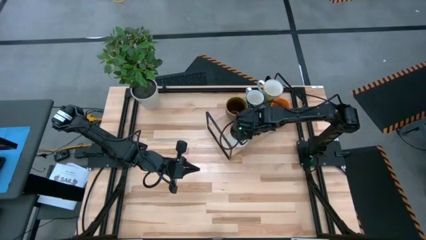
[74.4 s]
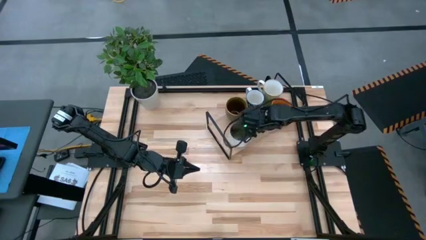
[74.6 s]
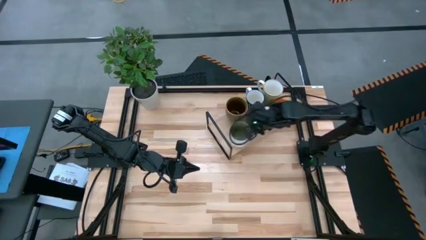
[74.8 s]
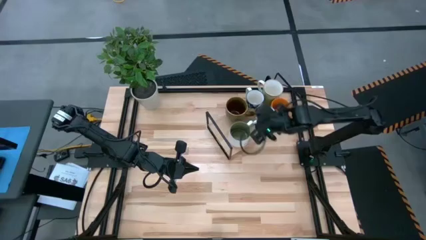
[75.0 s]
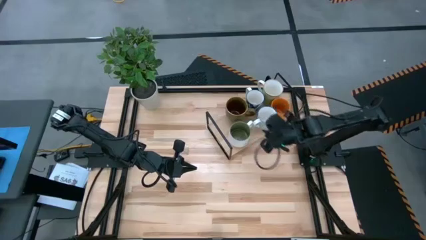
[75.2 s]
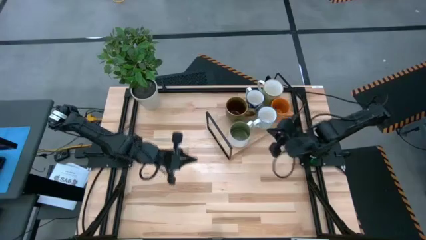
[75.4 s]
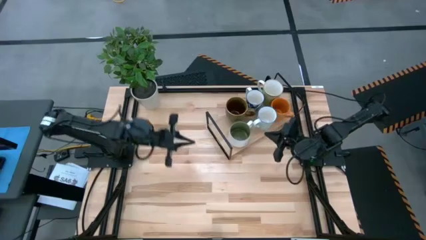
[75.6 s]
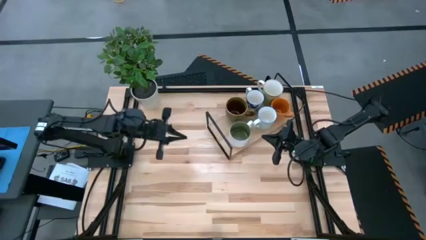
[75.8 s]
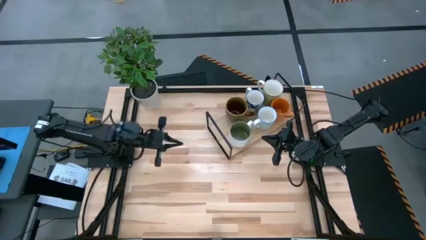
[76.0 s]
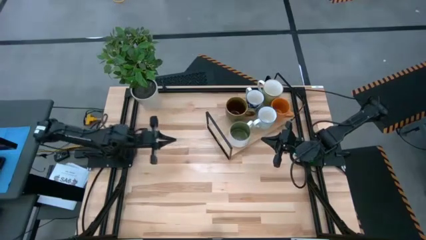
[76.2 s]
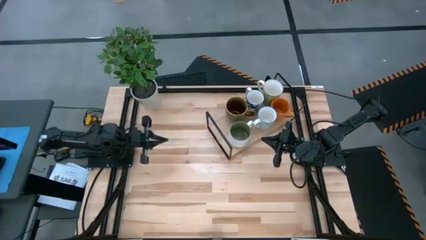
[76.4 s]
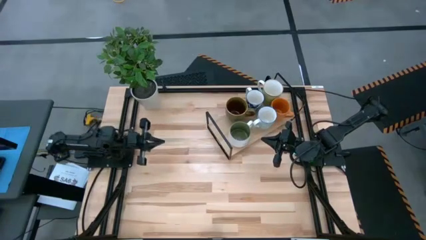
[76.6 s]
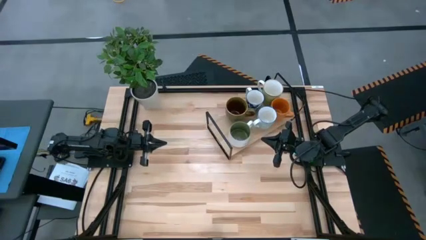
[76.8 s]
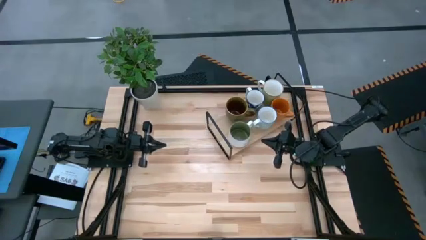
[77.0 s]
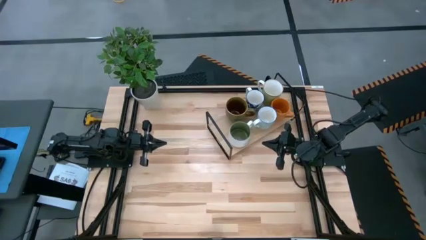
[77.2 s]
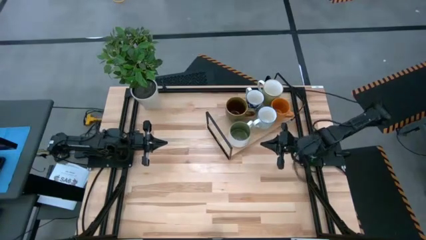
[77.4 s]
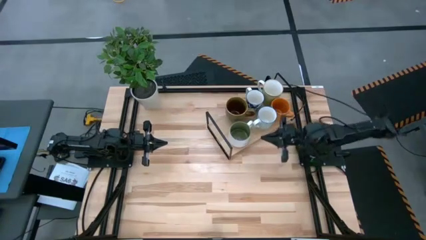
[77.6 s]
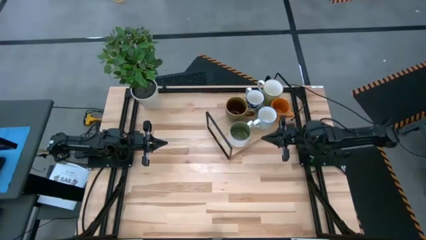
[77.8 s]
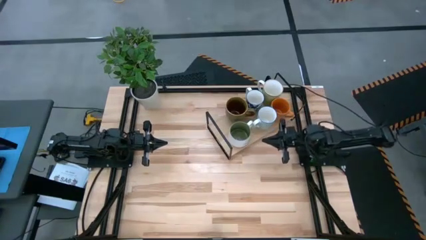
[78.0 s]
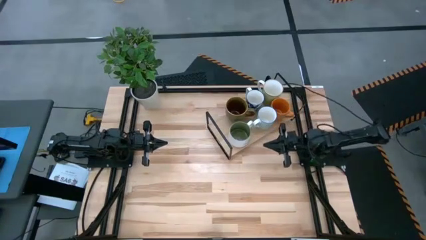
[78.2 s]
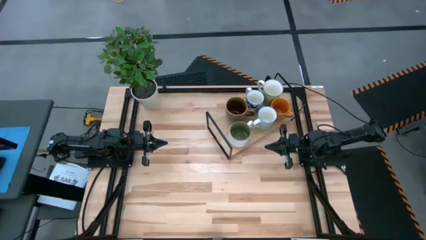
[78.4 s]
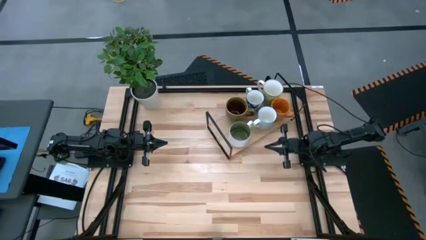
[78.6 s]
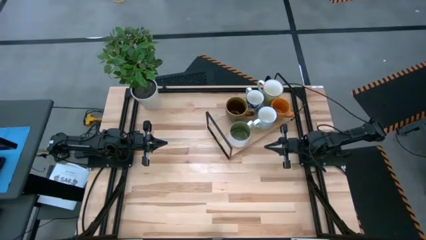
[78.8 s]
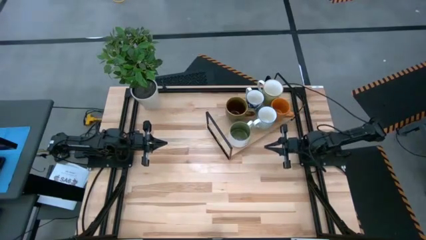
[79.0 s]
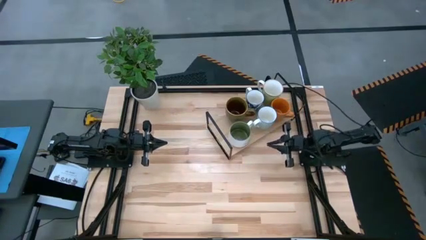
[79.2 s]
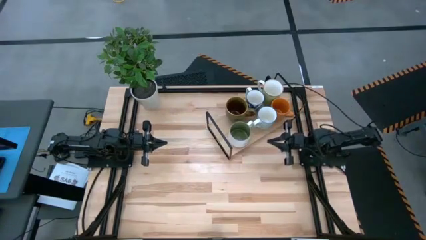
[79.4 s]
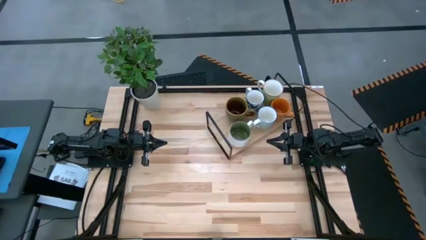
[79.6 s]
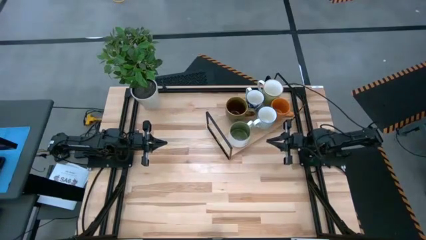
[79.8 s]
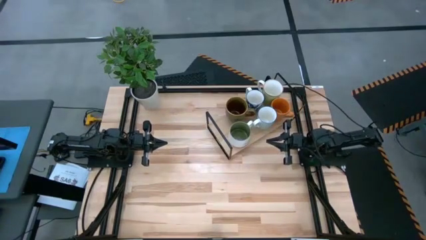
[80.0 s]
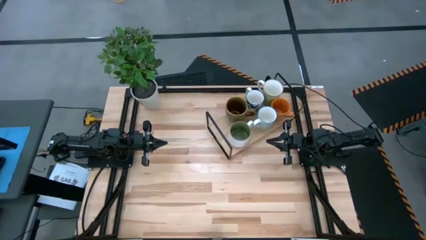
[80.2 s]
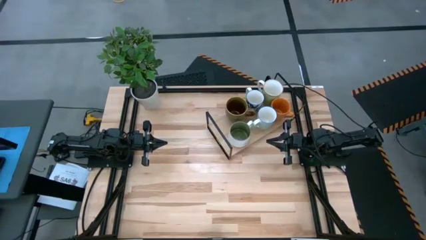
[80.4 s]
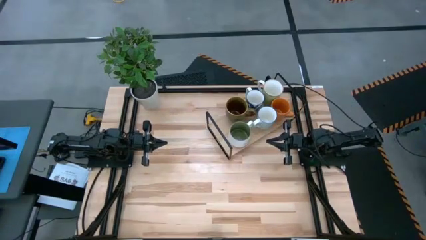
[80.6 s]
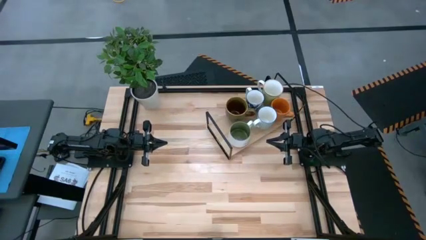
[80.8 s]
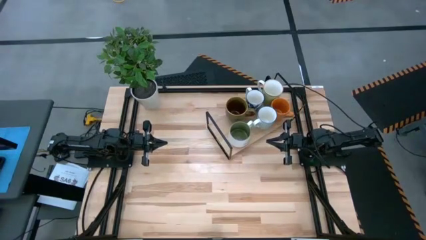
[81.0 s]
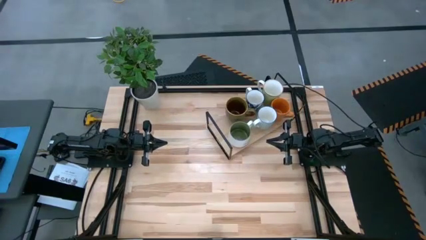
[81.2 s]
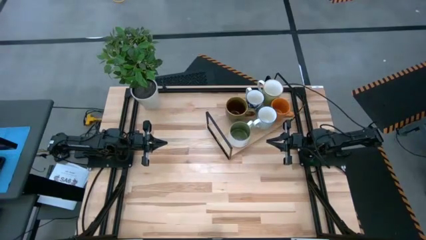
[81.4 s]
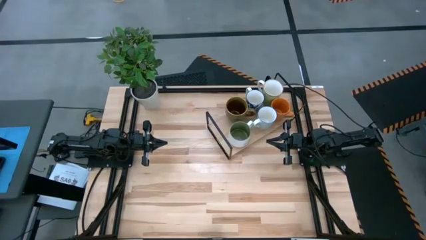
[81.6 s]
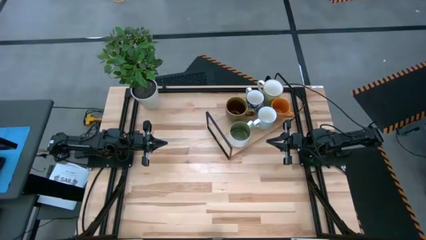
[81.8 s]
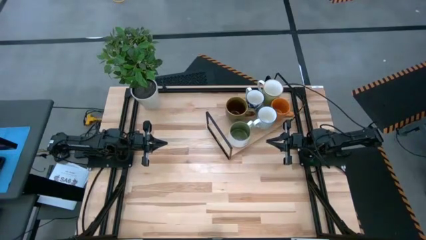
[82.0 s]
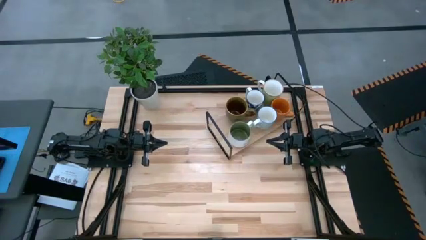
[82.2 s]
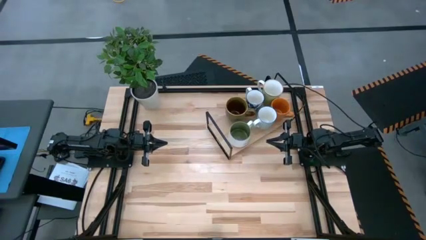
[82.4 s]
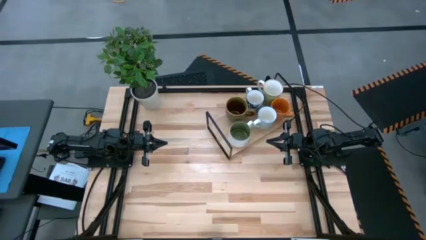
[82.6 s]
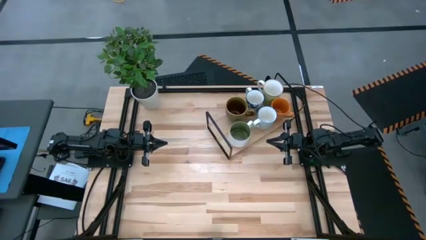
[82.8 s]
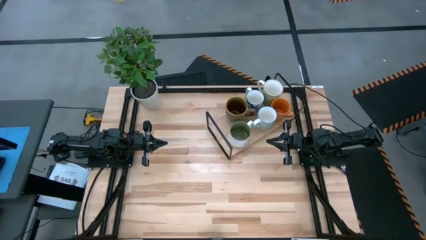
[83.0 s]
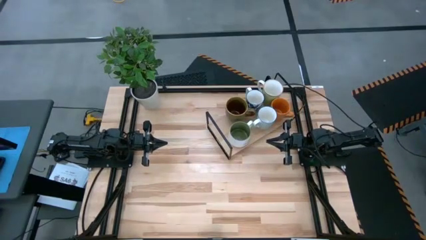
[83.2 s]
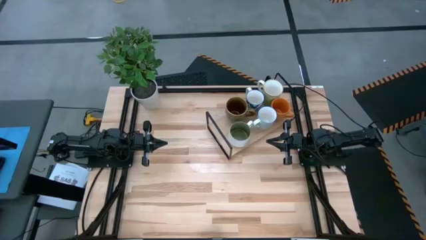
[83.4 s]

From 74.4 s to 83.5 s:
Task: Place coffee mugs
Return to Home Position

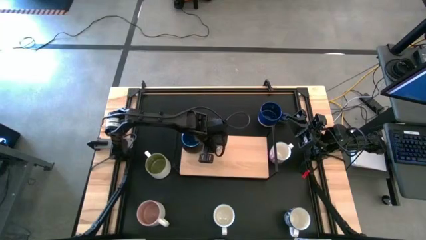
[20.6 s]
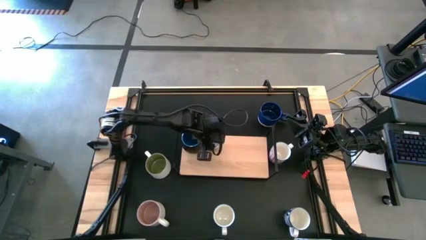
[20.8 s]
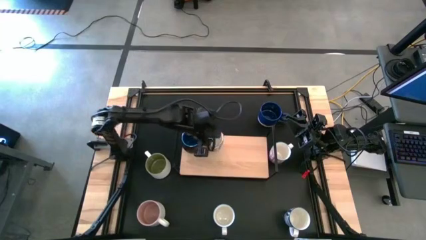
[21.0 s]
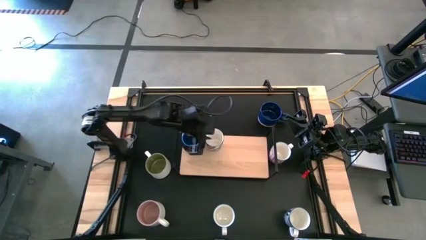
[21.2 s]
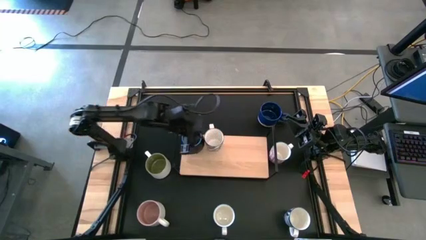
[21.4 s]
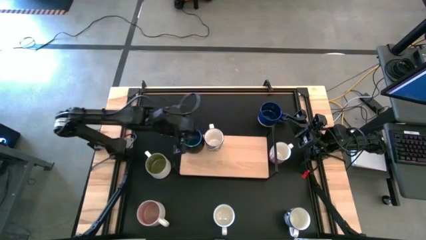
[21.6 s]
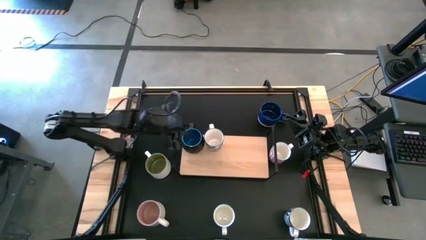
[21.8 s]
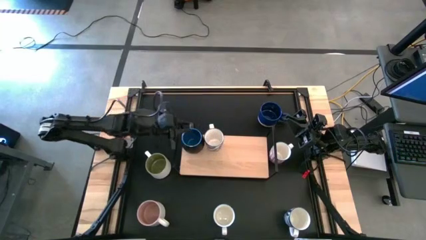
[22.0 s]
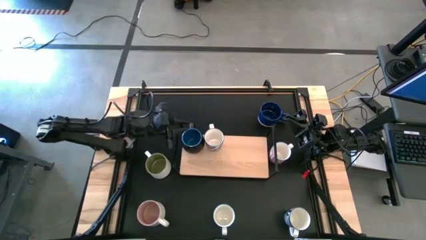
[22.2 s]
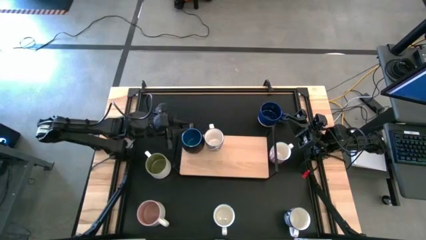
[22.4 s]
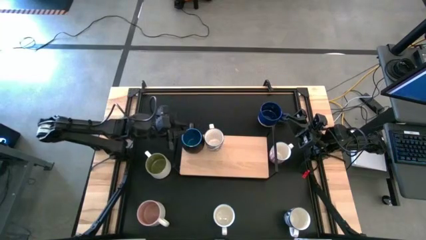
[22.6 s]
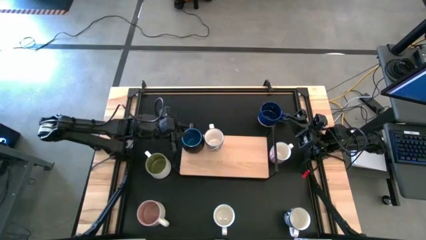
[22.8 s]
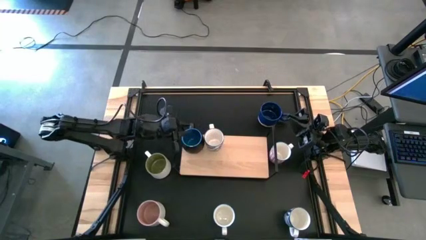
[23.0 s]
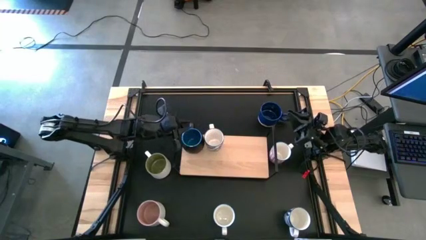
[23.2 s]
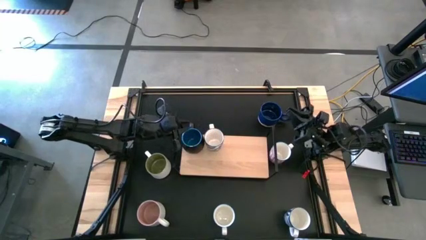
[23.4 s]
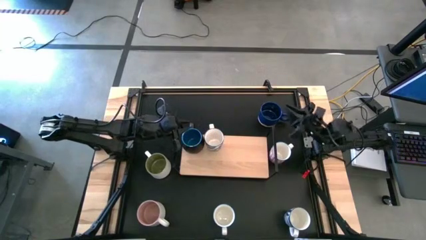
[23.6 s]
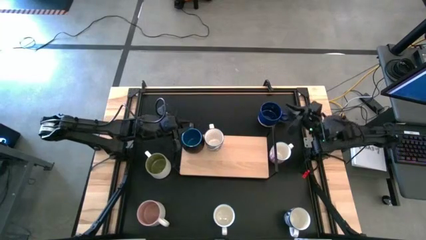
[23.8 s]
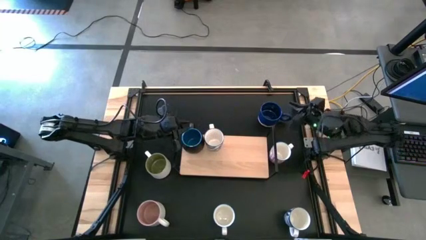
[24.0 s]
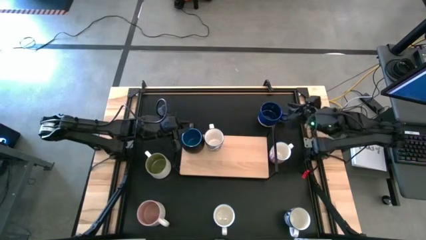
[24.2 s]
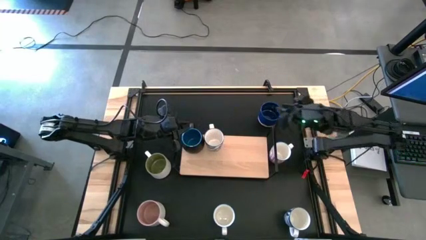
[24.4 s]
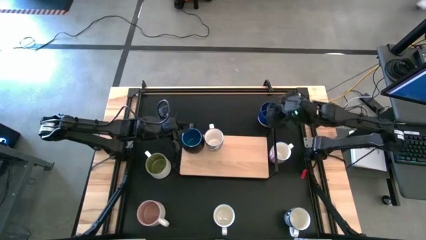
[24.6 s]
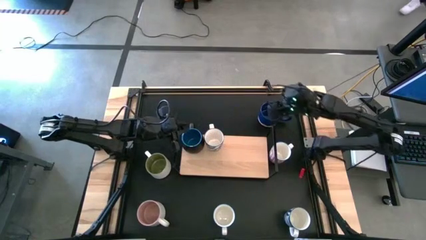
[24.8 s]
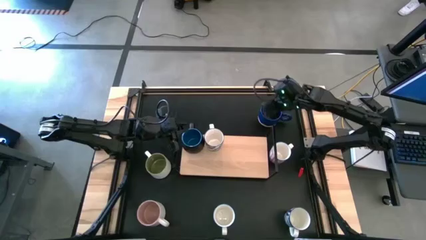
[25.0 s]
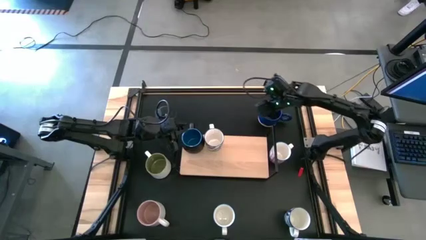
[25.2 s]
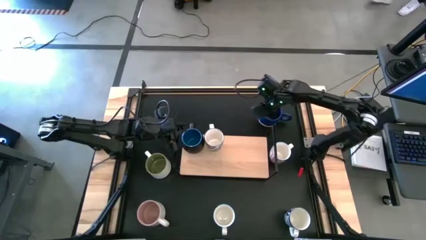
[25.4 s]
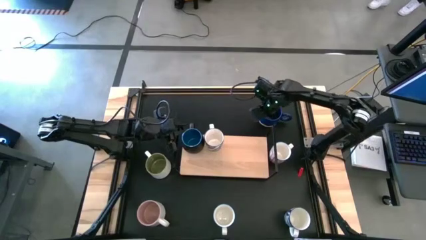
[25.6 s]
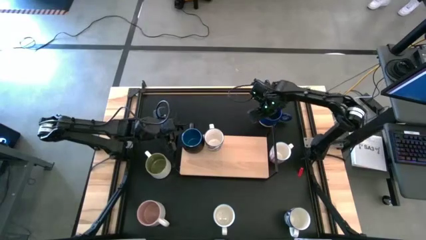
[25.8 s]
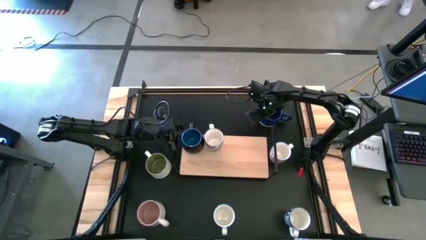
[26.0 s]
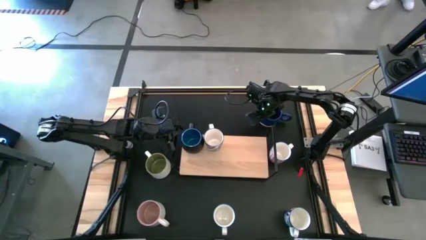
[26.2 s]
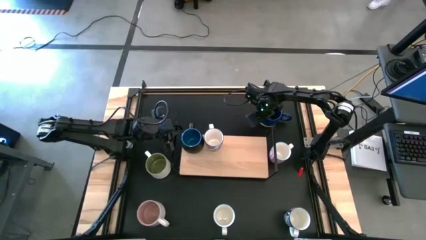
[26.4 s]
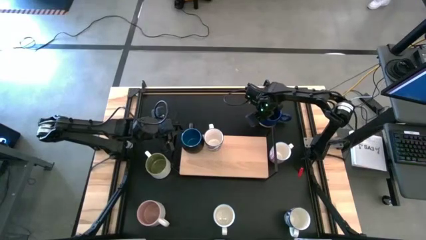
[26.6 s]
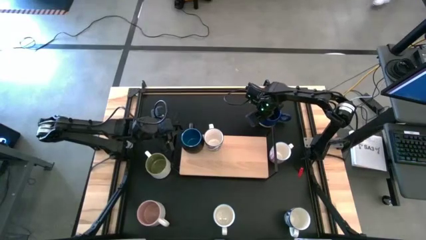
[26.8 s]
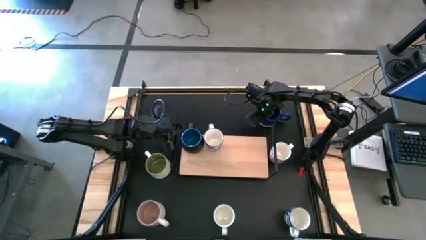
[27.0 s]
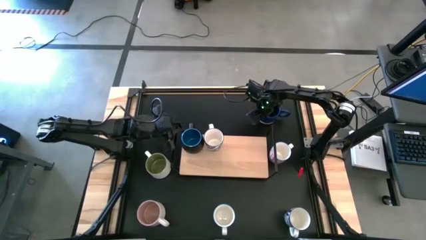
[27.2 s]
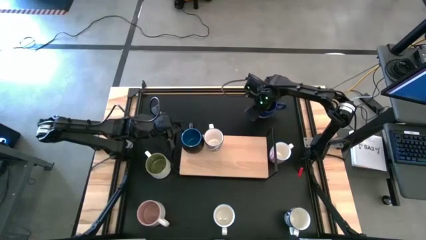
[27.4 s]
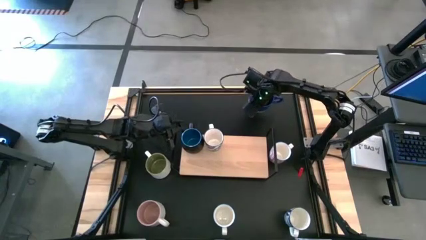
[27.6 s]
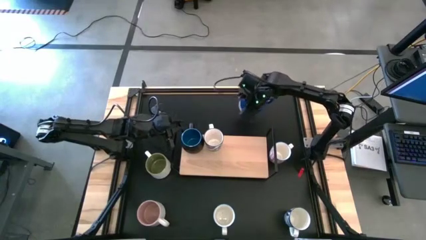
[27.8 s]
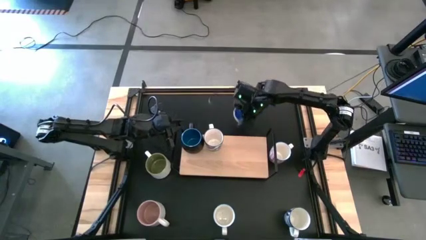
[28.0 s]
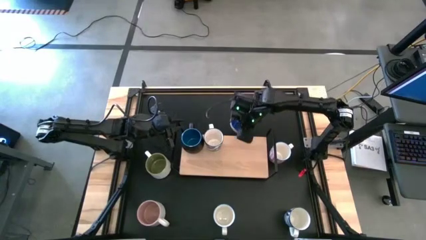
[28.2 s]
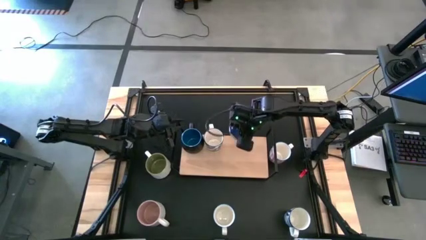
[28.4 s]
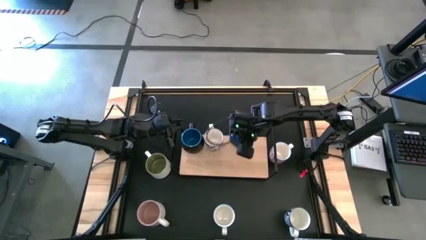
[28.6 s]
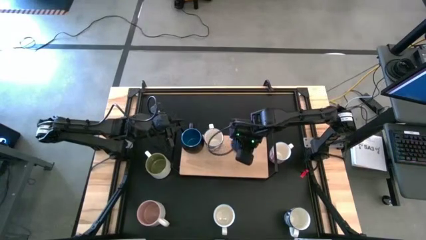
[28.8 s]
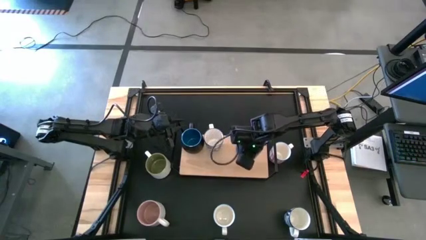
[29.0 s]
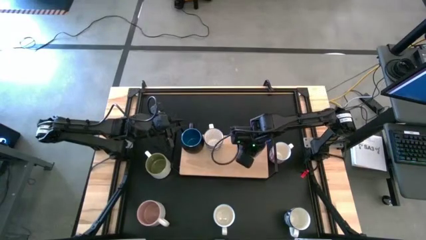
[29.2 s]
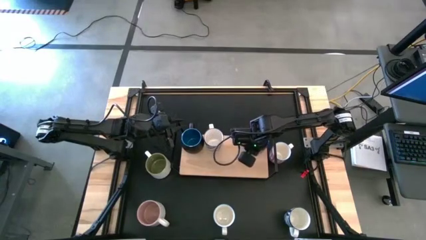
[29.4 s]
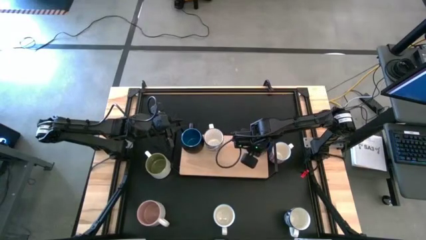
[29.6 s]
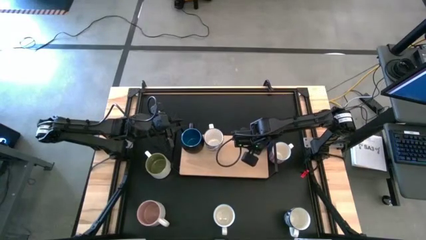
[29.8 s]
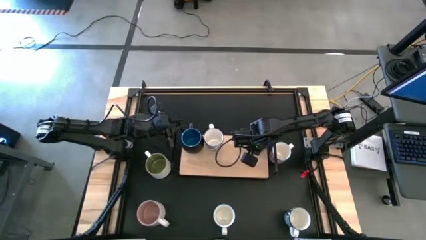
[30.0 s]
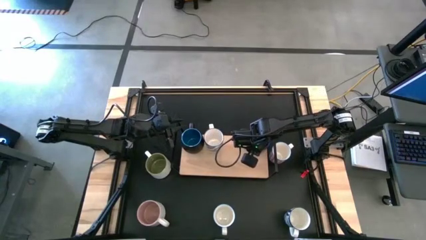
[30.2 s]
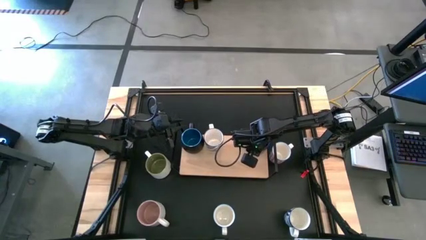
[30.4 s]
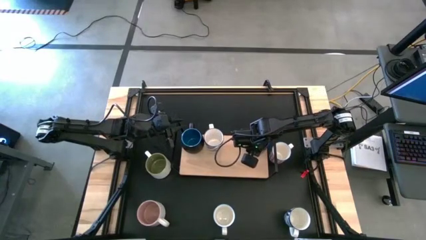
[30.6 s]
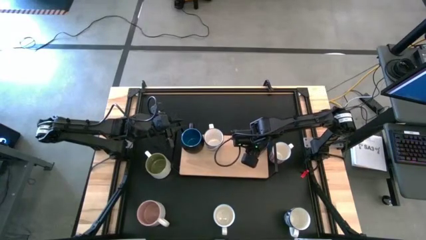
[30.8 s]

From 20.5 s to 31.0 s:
Task: Place coffee mugs
Put the dark blue mug on the shelf
